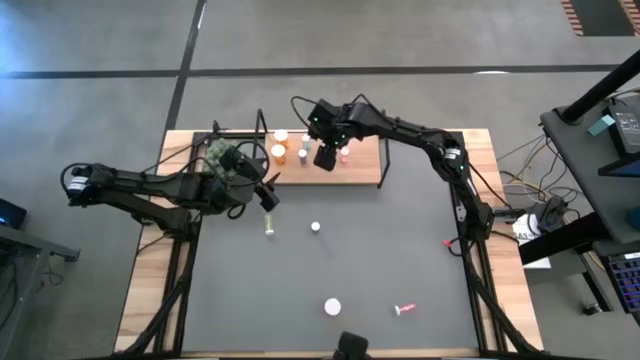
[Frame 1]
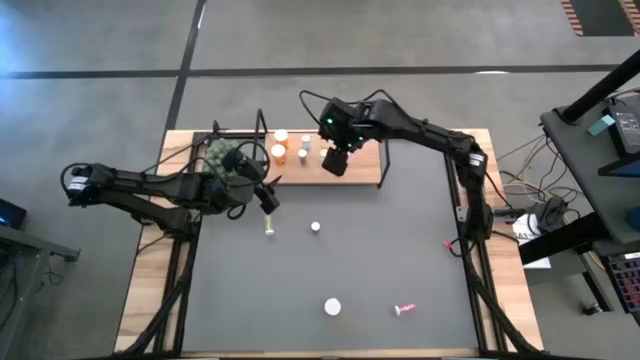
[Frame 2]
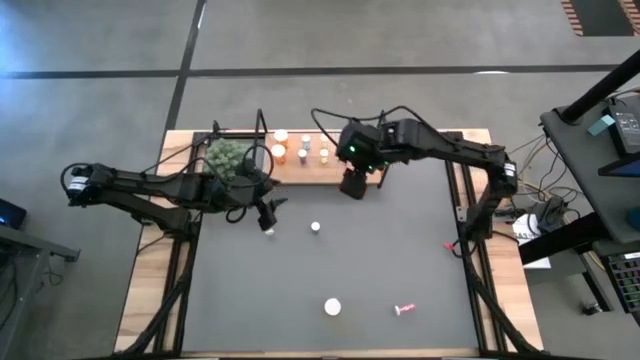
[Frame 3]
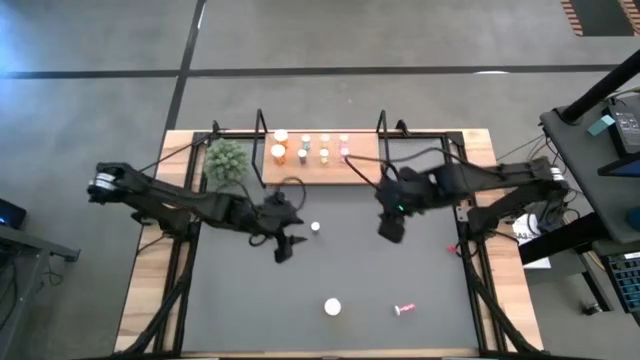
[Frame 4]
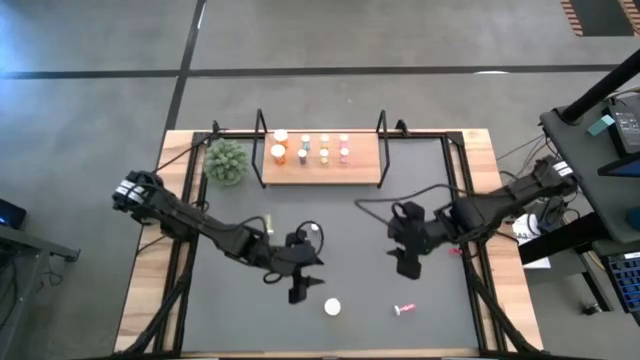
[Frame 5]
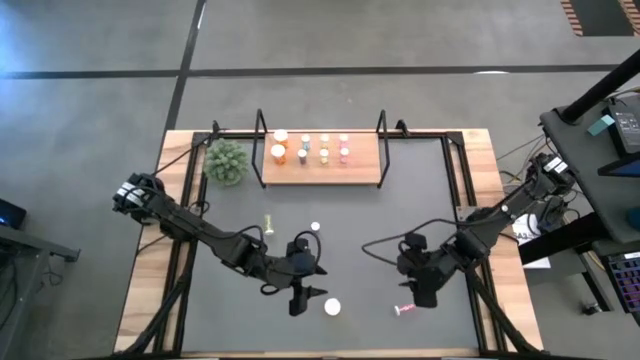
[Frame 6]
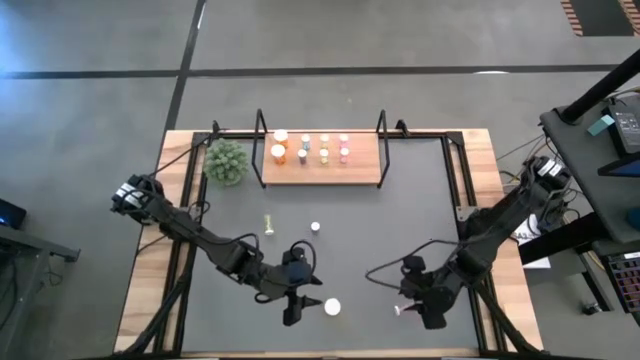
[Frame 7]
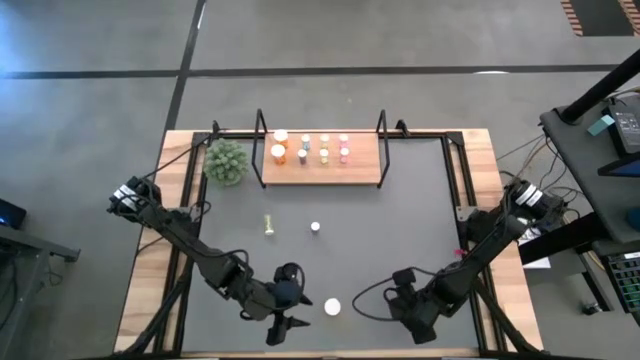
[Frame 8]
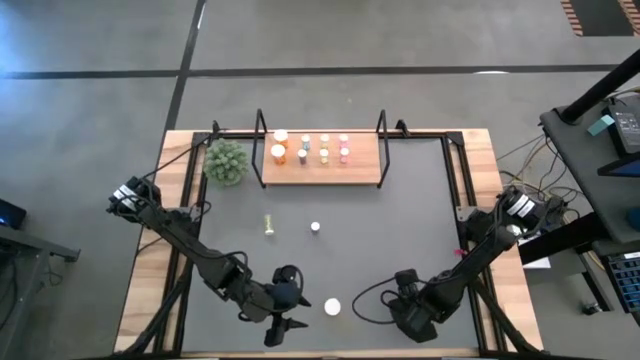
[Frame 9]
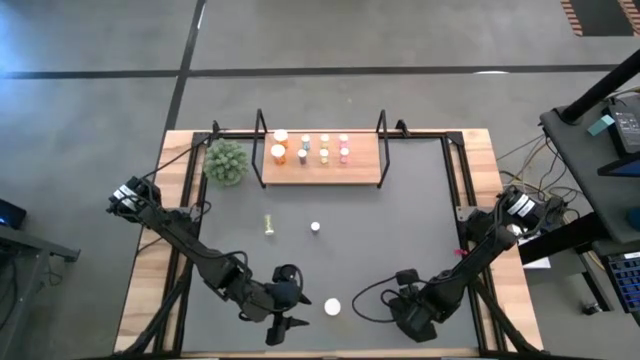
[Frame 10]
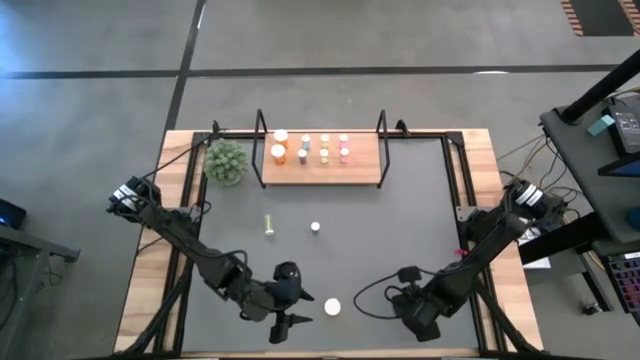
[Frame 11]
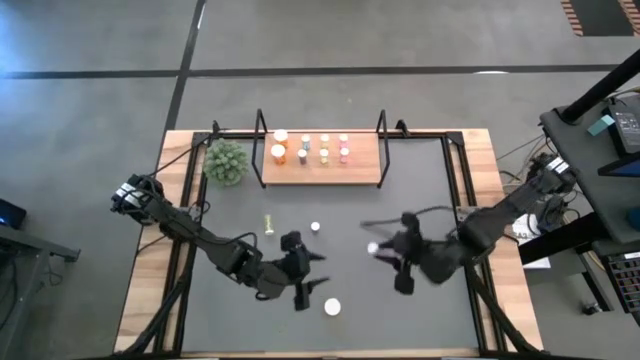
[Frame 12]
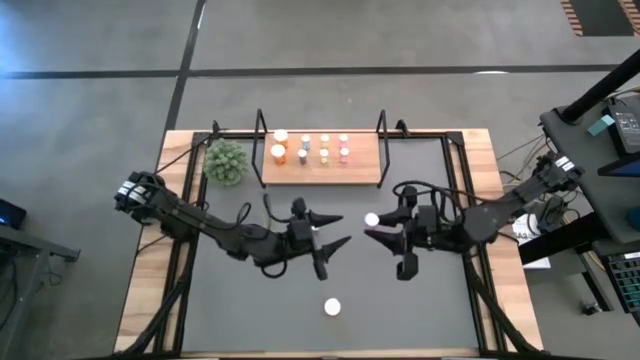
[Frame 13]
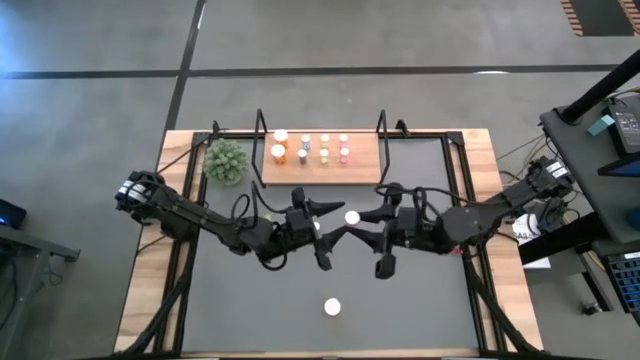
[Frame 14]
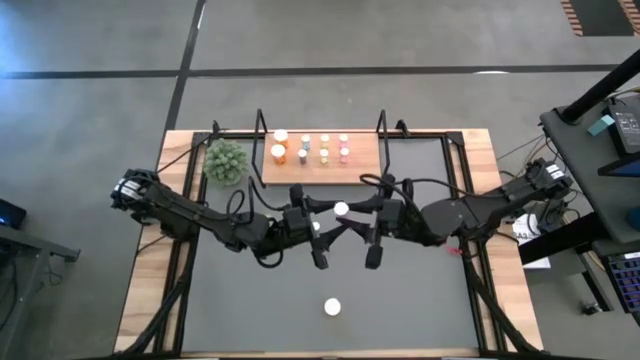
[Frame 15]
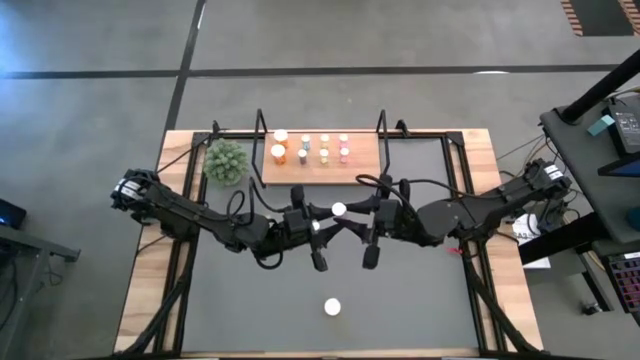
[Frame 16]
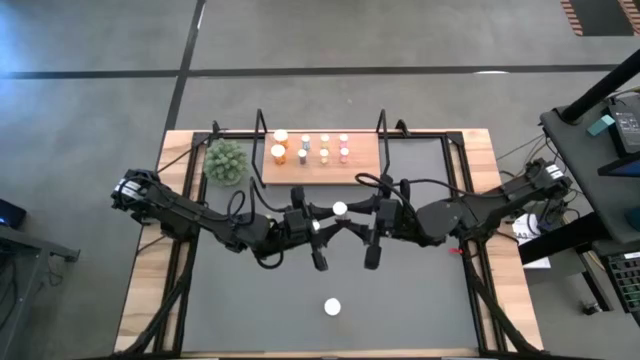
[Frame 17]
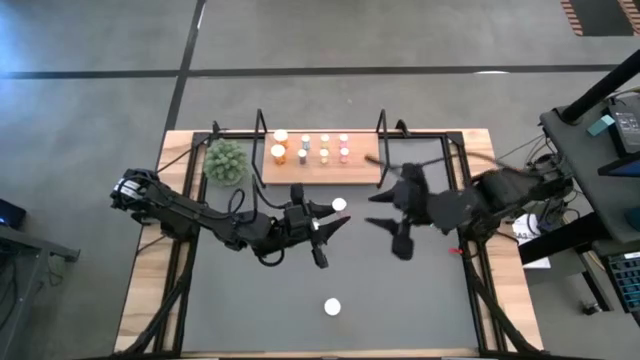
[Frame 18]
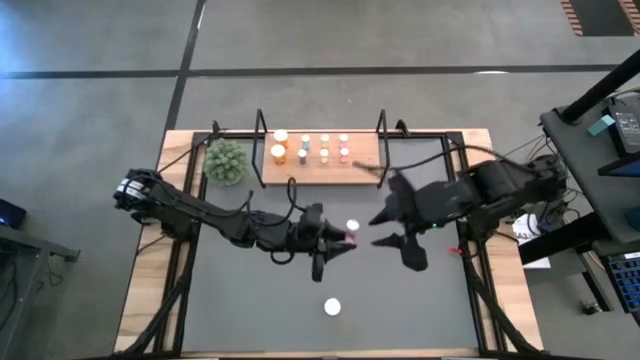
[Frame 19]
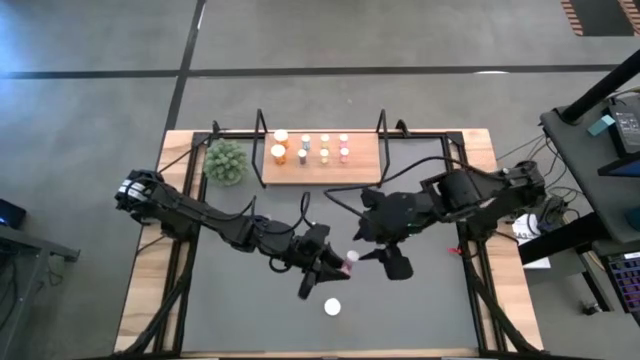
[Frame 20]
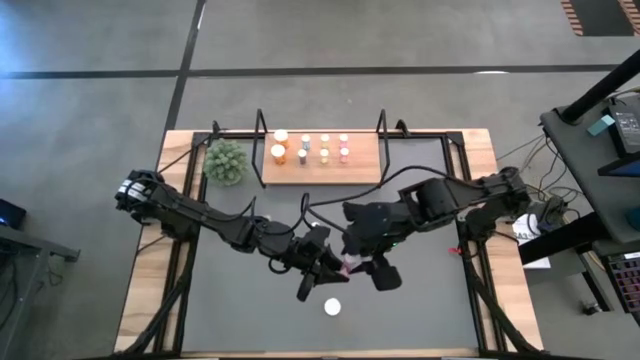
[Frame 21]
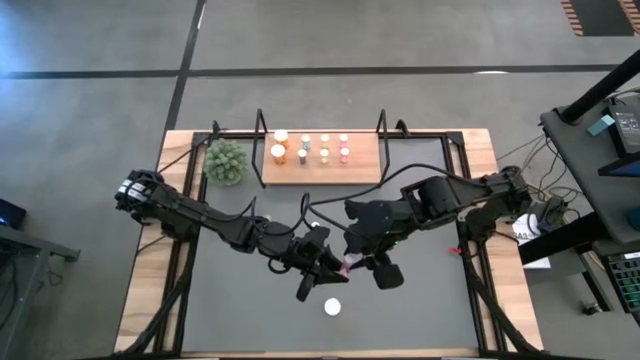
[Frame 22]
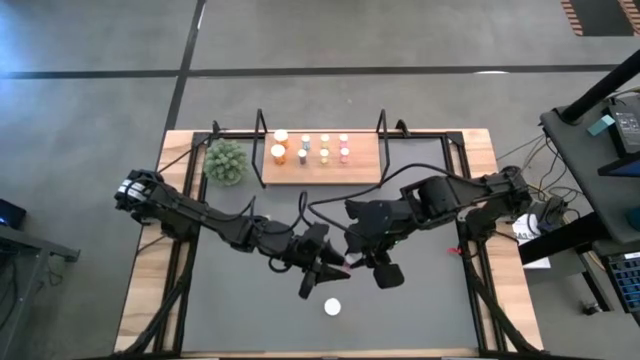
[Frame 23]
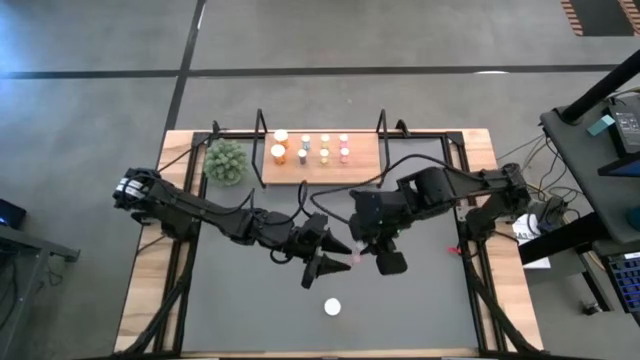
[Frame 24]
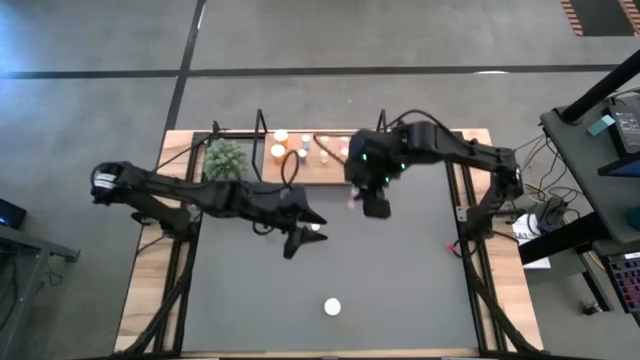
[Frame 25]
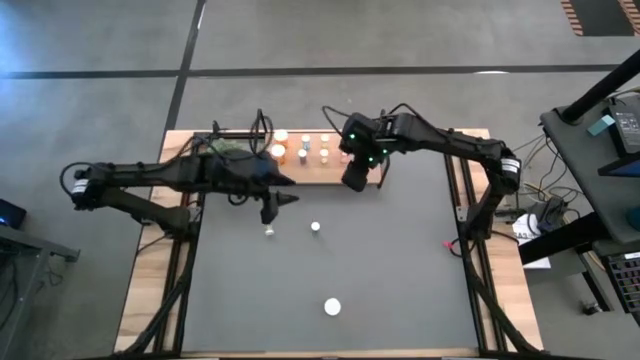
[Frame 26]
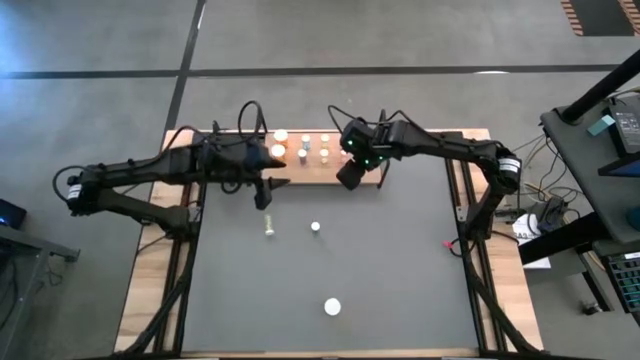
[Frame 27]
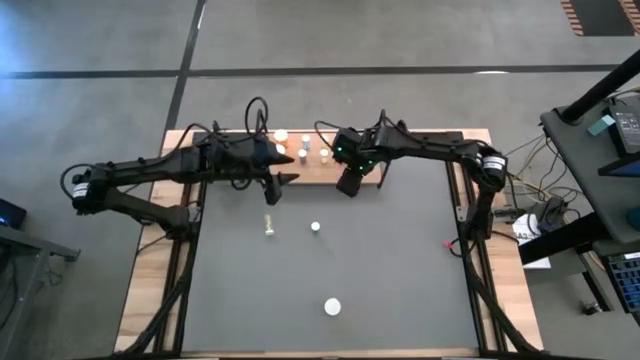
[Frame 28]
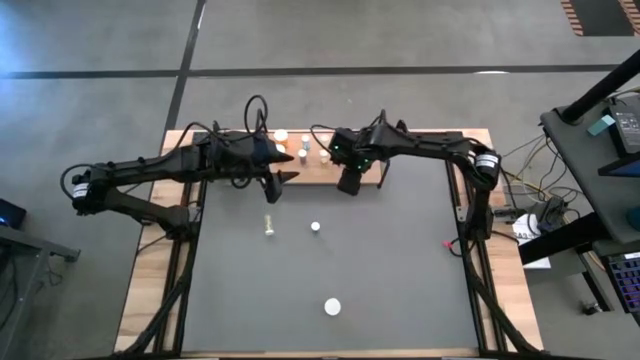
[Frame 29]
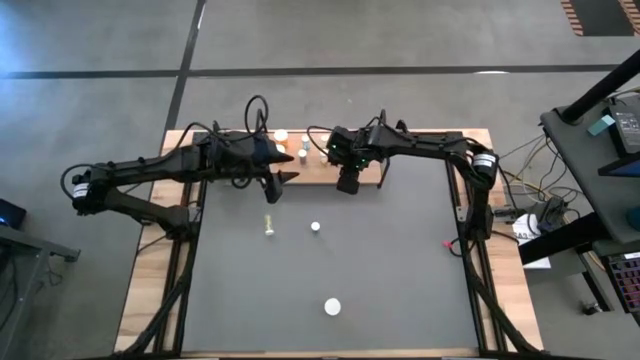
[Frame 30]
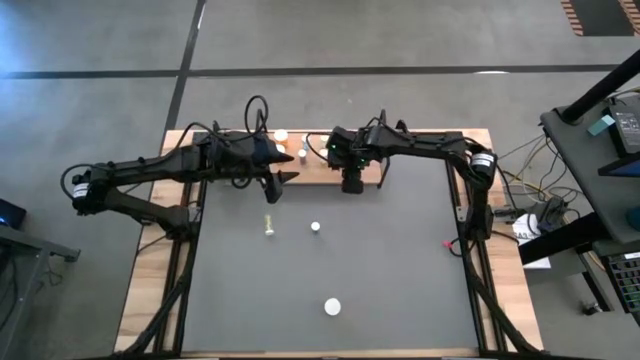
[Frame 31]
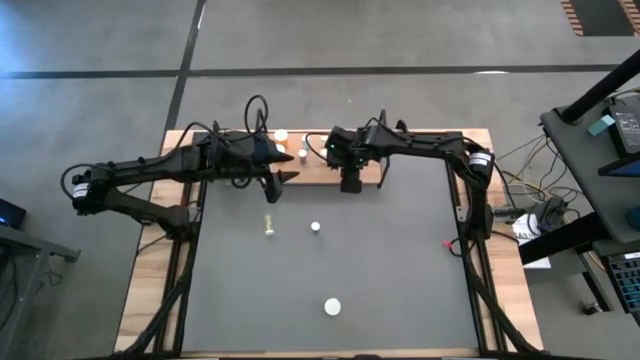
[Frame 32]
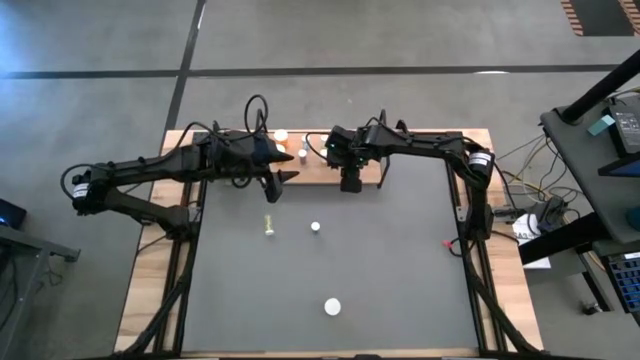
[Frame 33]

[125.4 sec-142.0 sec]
Task: Pick and place medicine bottles onto shelf by color
Put the pink pill bottle on the shelf aligned with the other pink pill bottles

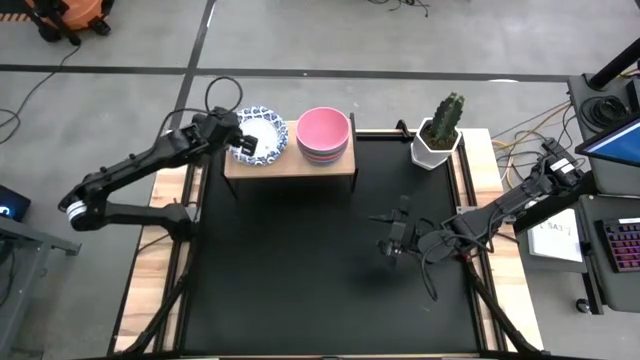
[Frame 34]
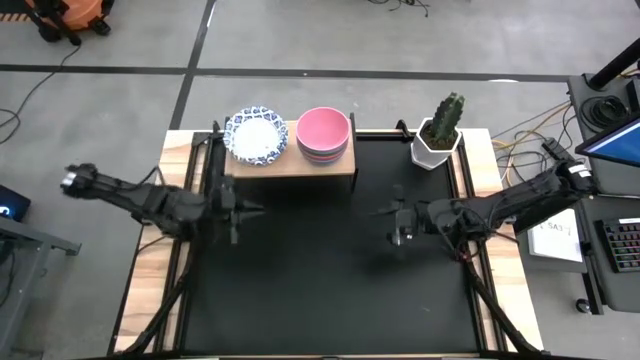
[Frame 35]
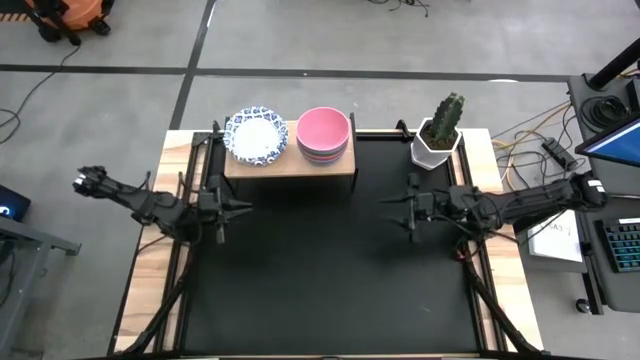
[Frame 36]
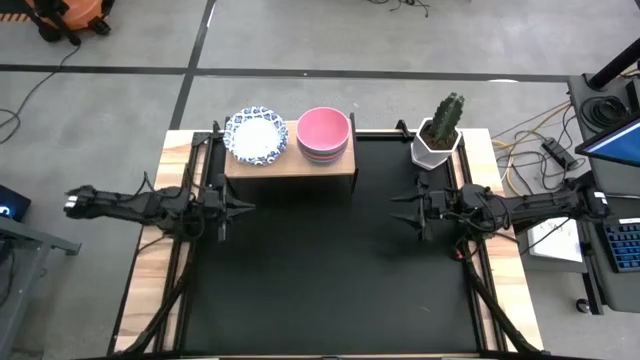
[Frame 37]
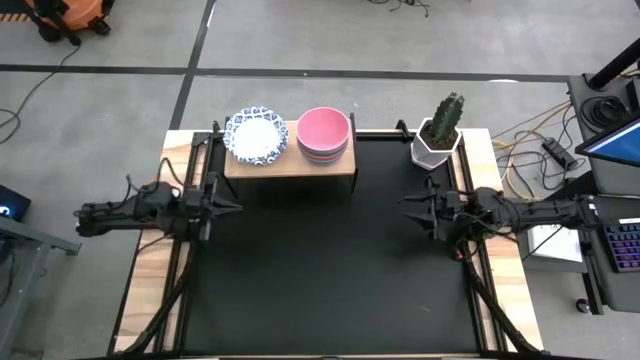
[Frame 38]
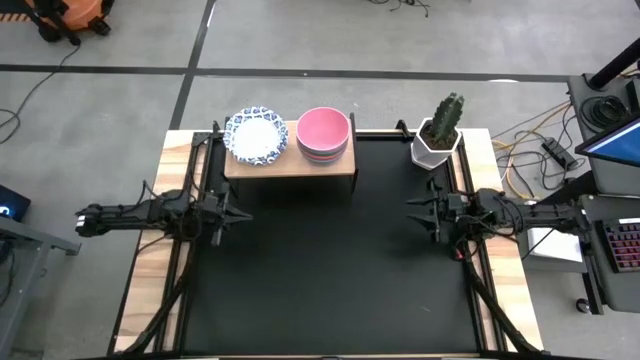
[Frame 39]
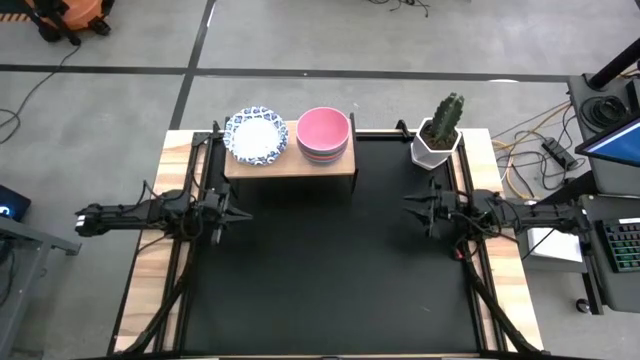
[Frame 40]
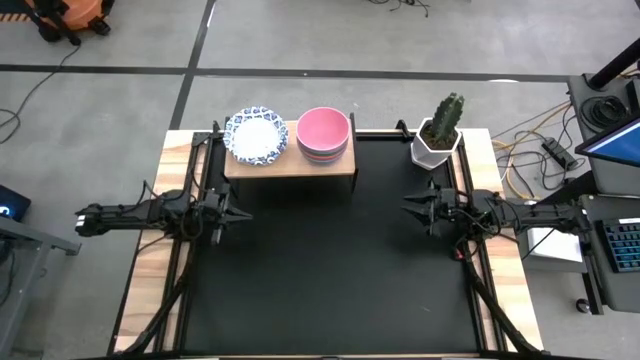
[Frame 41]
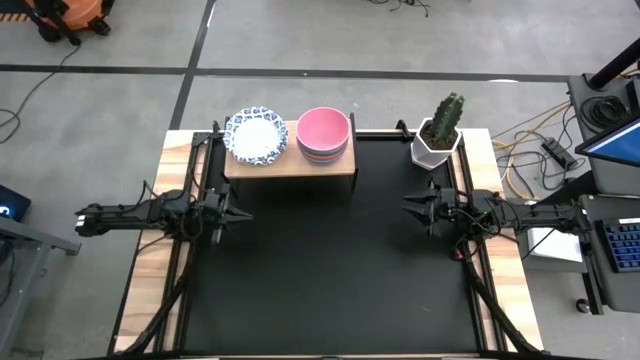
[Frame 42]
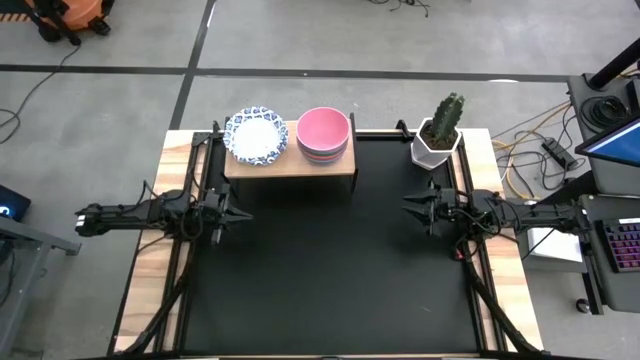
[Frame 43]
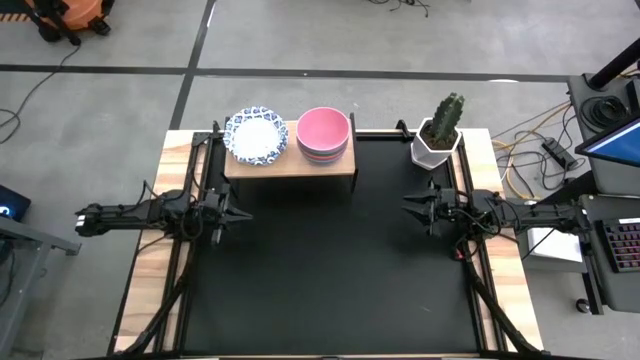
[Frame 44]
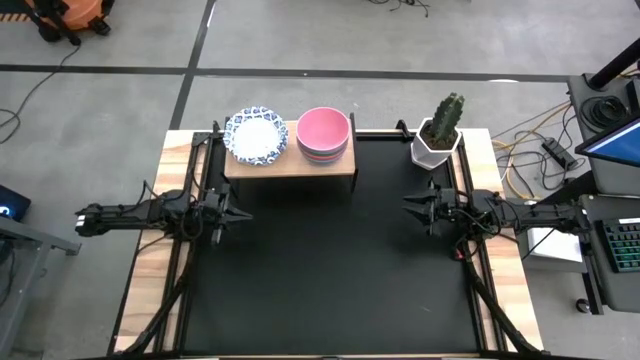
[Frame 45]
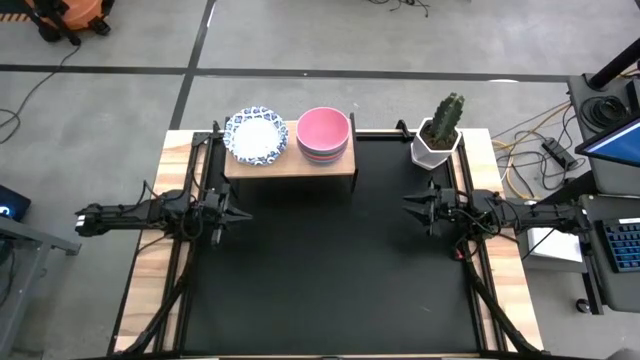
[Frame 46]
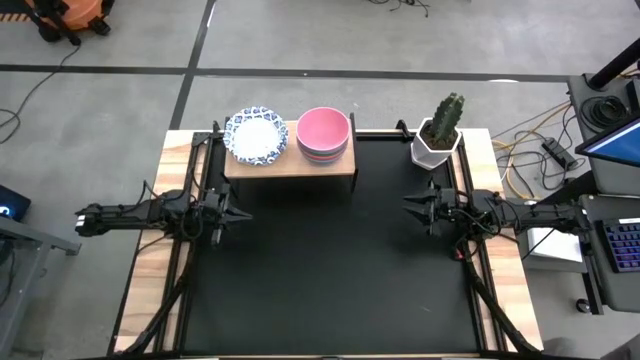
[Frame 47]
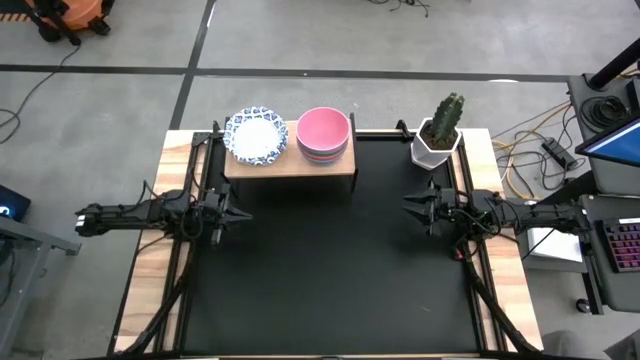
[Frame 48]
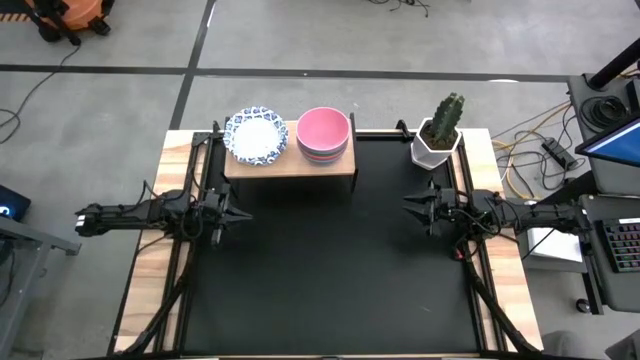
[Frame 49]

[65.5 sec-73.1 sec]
Task: Place and stack bowls onto a shelf
Return to Home Position
